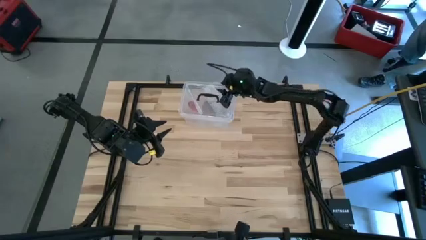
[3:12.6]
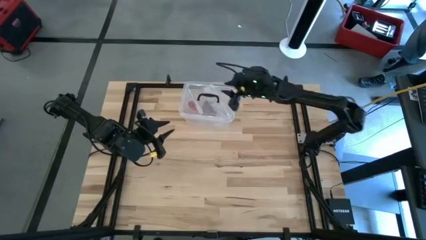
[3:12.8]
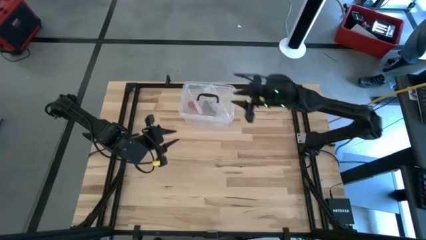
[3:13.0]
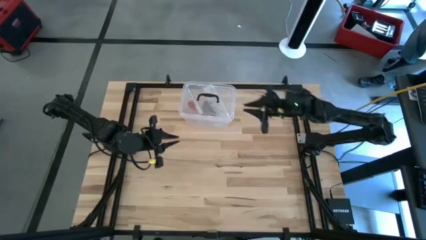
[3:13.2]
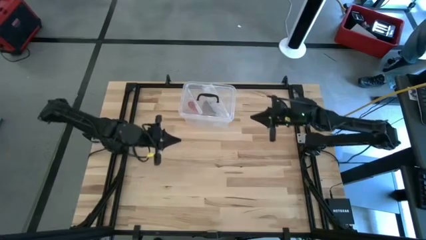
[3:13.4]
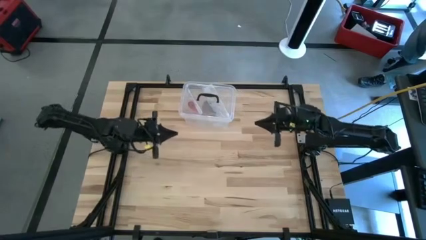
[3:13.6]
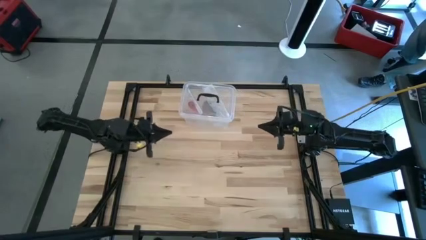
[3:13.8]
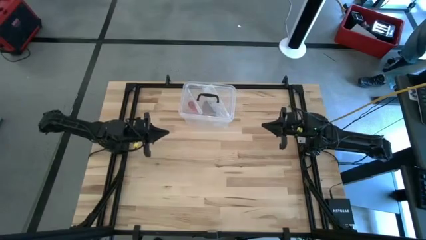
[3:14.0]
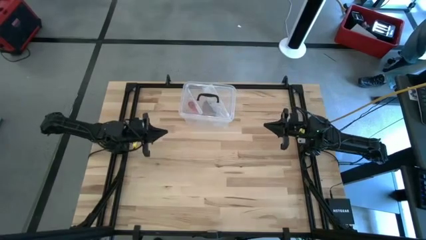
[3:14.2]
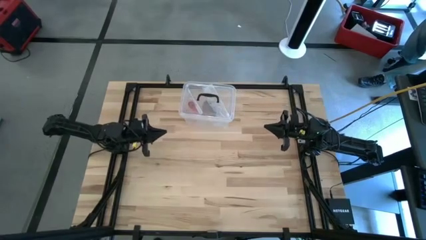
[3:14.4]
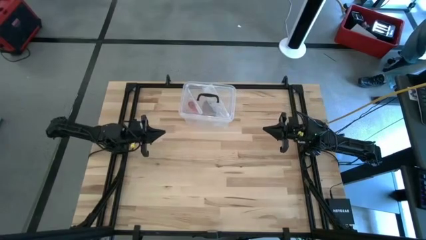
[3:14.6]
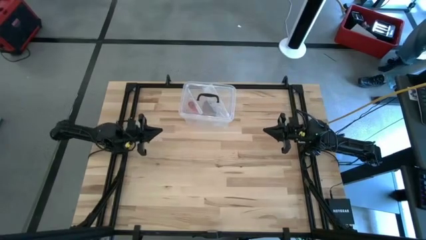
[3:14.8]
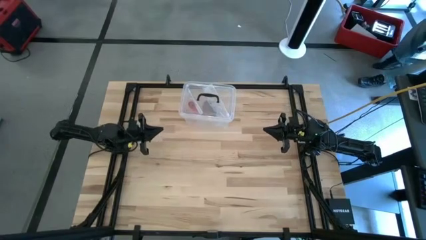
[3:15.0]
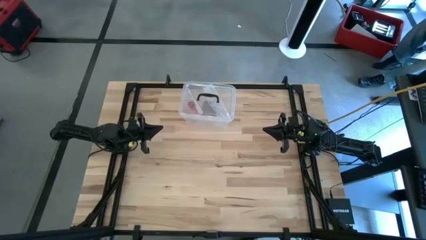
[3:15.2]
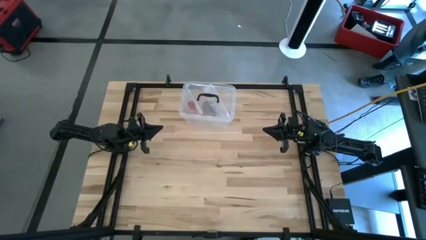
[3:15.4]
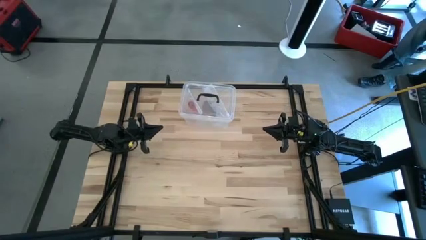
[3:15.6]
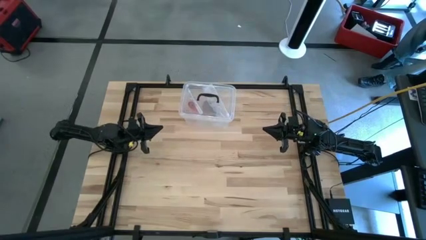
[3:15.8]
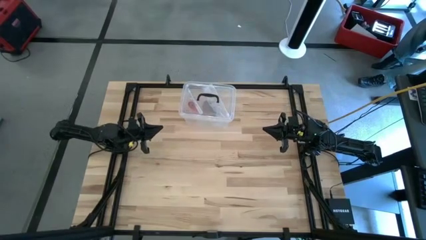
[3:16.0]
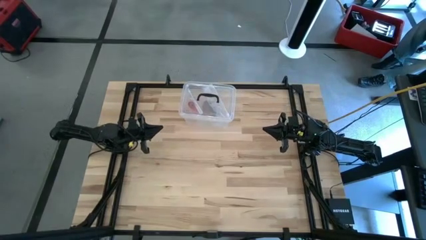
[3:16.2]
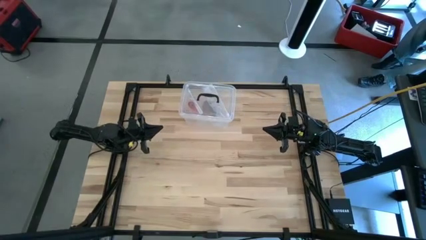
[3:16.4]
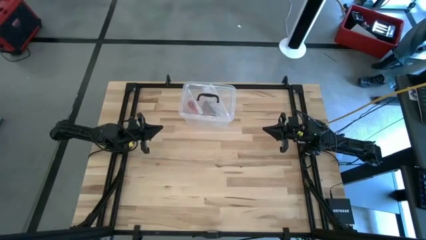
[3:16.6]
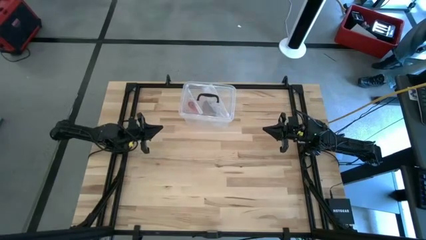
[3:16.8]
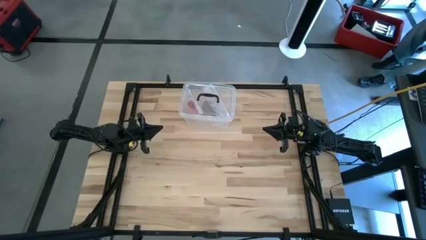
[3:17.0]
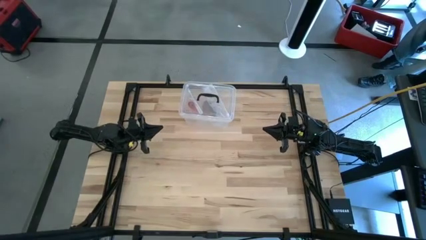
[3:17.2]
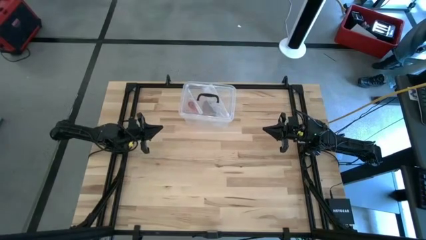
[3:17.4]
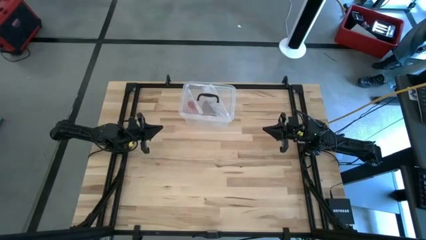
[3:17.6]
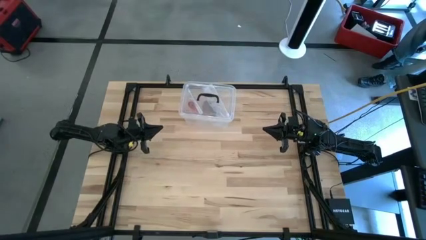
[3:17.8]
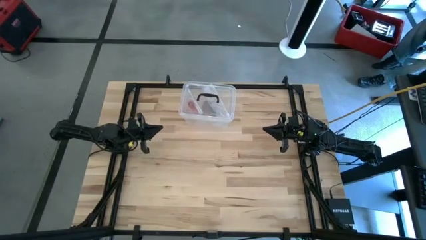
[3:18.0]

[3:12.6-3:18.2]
Task: Roll bandage
Return to Home Position

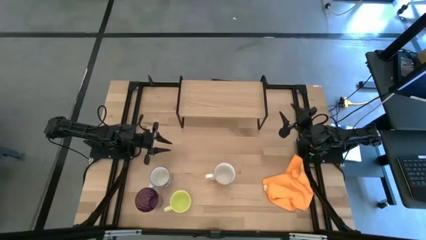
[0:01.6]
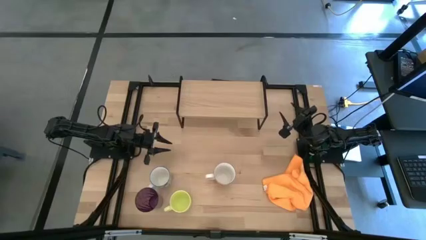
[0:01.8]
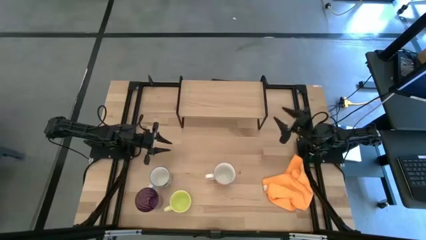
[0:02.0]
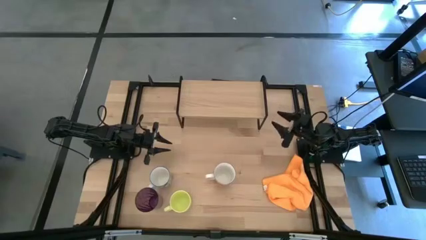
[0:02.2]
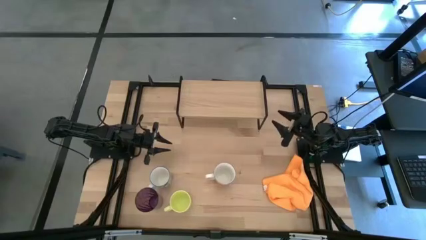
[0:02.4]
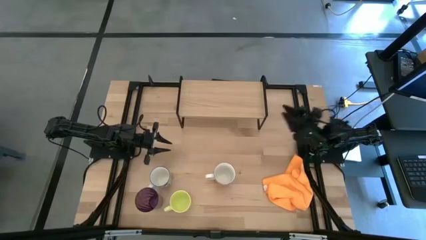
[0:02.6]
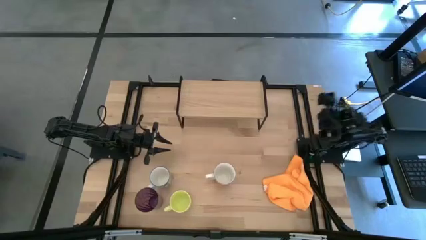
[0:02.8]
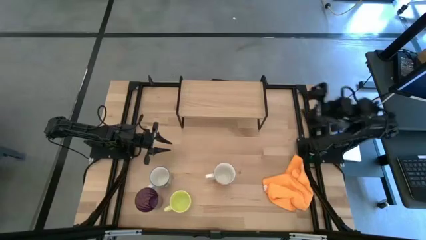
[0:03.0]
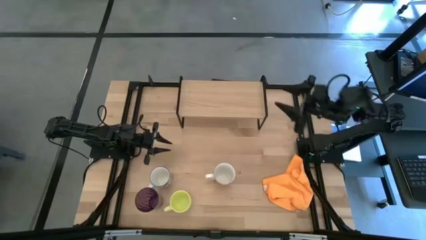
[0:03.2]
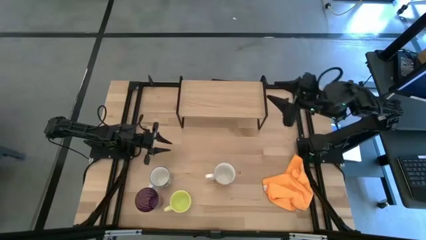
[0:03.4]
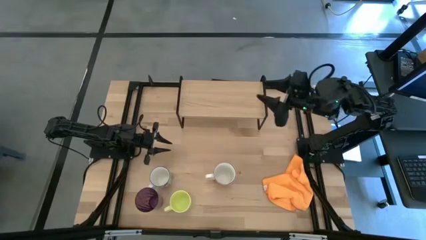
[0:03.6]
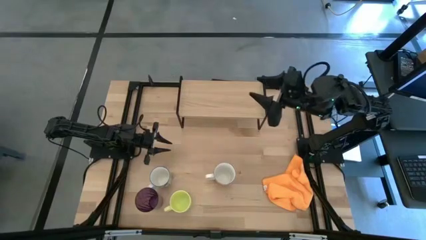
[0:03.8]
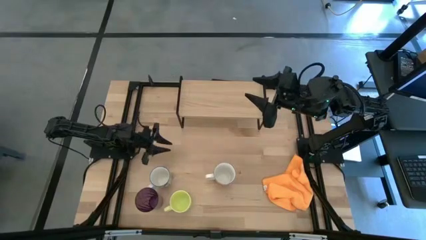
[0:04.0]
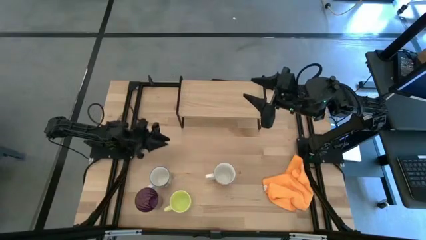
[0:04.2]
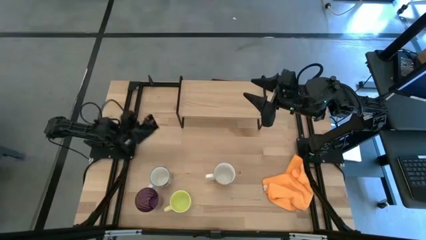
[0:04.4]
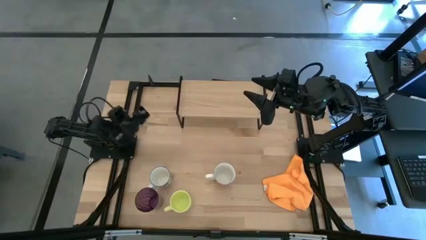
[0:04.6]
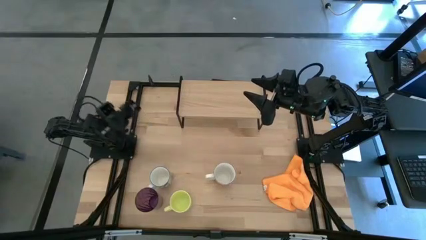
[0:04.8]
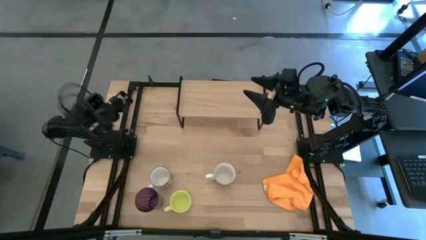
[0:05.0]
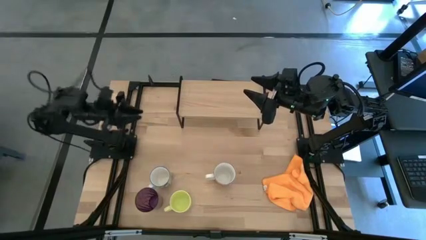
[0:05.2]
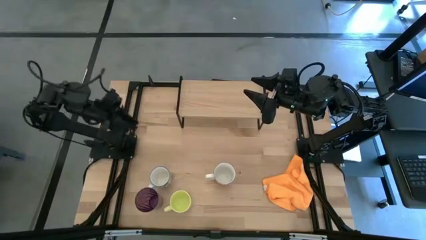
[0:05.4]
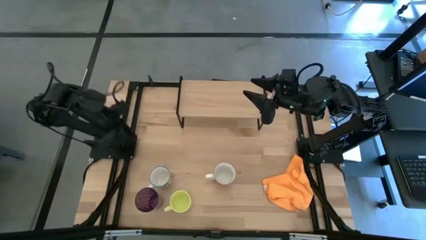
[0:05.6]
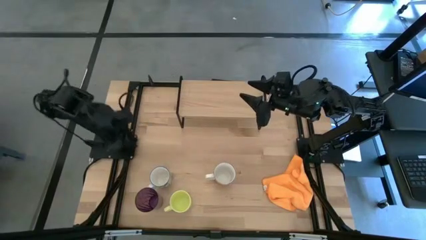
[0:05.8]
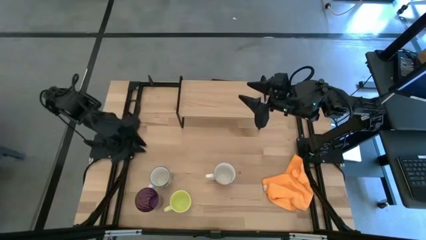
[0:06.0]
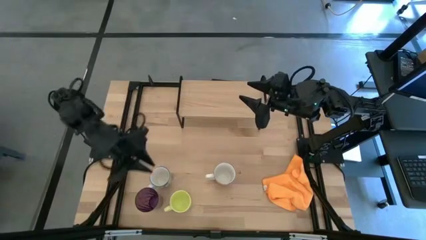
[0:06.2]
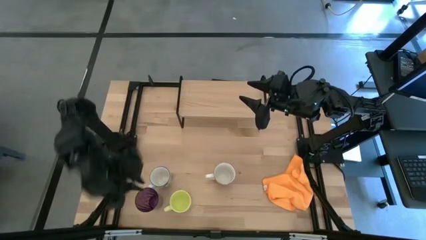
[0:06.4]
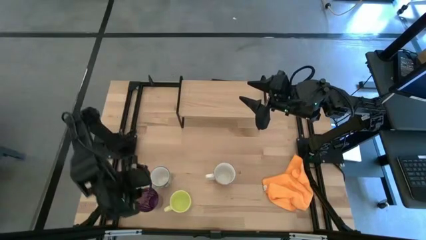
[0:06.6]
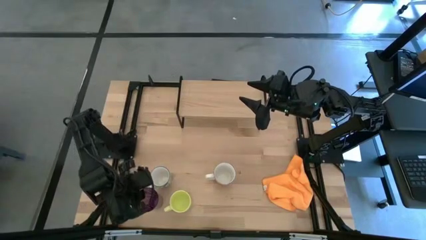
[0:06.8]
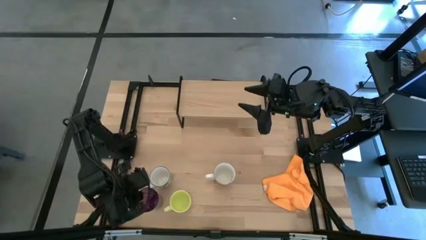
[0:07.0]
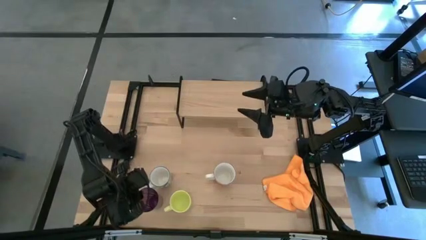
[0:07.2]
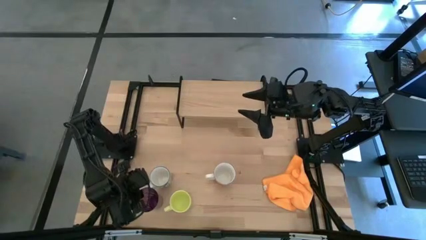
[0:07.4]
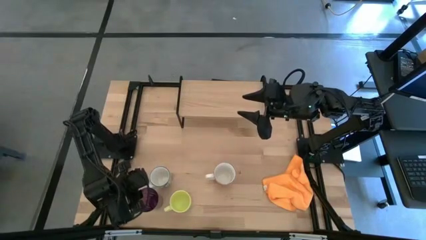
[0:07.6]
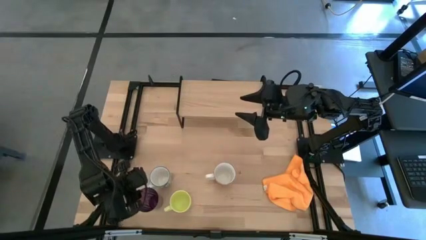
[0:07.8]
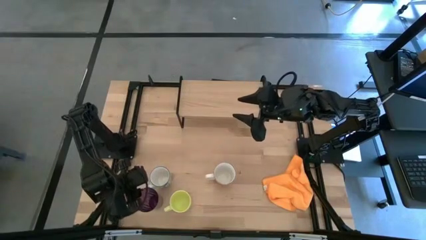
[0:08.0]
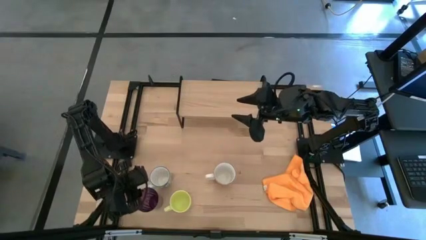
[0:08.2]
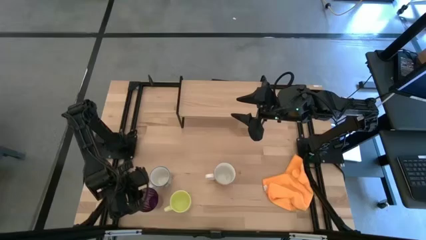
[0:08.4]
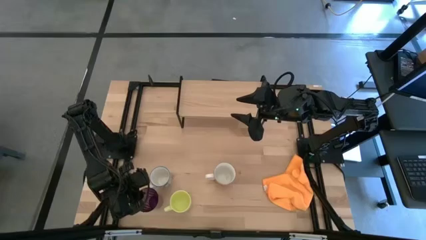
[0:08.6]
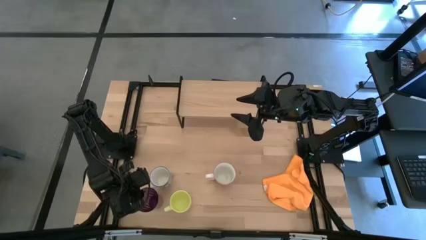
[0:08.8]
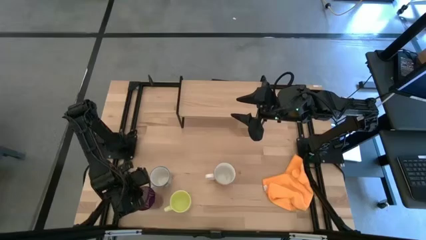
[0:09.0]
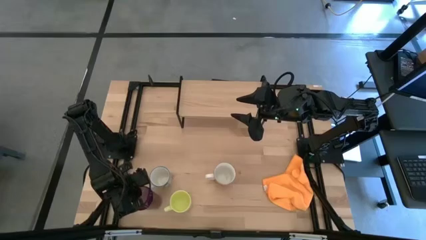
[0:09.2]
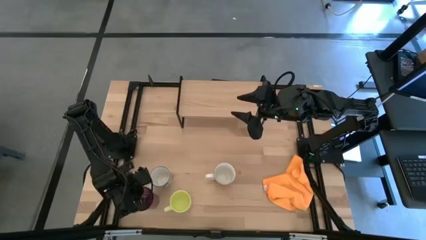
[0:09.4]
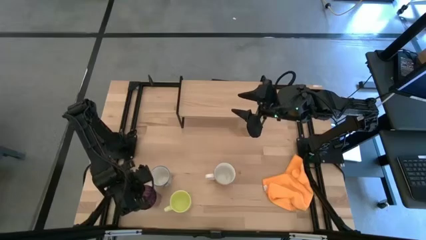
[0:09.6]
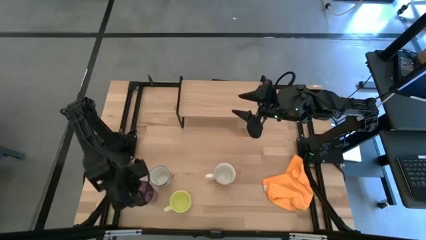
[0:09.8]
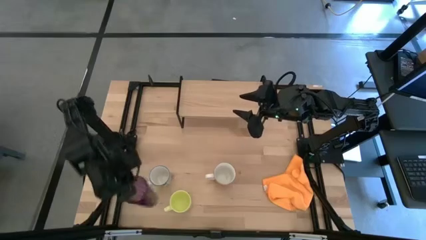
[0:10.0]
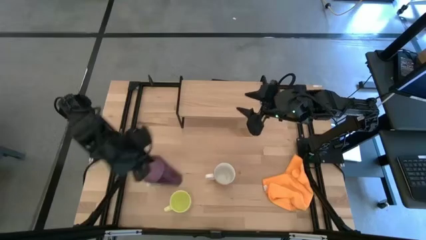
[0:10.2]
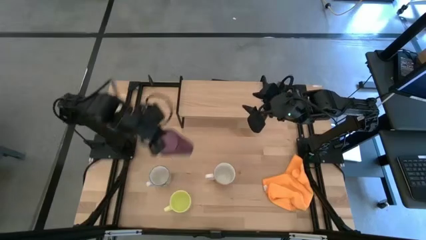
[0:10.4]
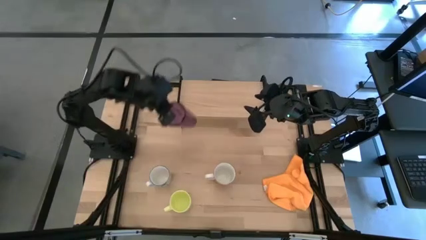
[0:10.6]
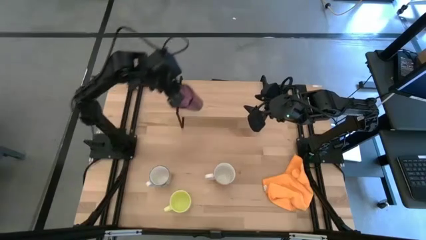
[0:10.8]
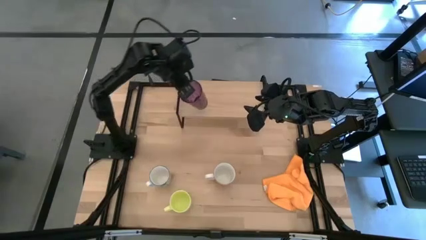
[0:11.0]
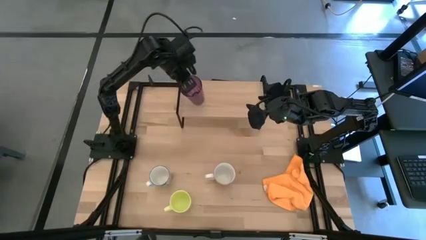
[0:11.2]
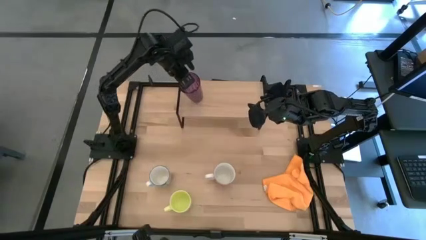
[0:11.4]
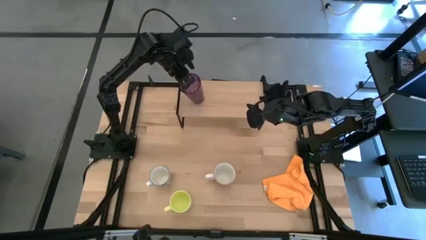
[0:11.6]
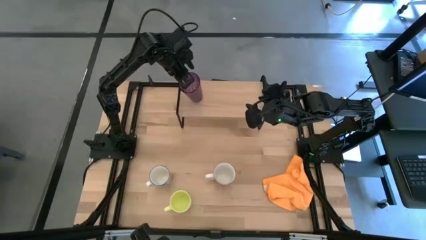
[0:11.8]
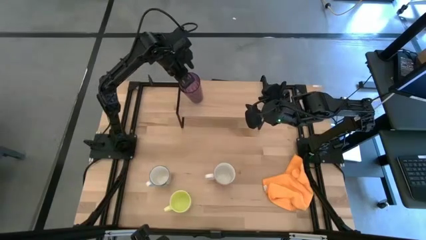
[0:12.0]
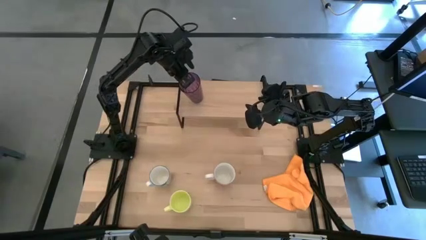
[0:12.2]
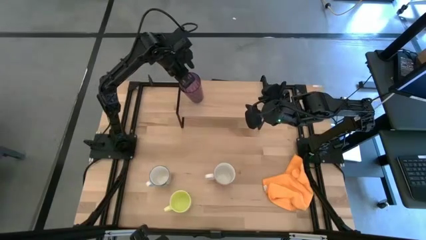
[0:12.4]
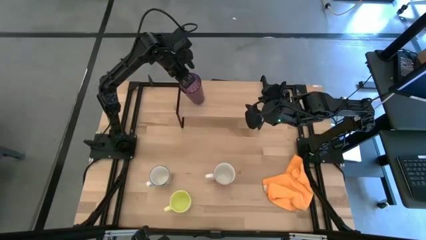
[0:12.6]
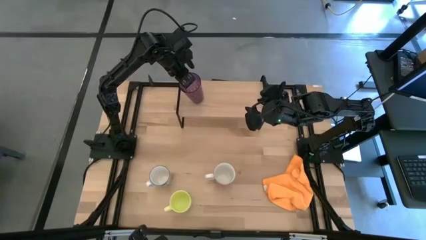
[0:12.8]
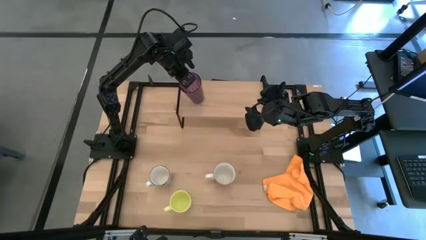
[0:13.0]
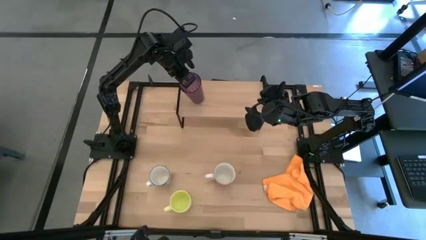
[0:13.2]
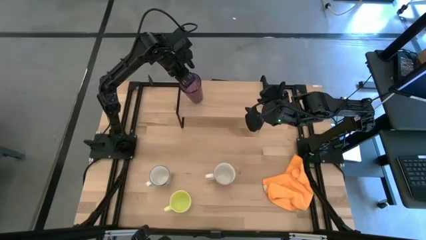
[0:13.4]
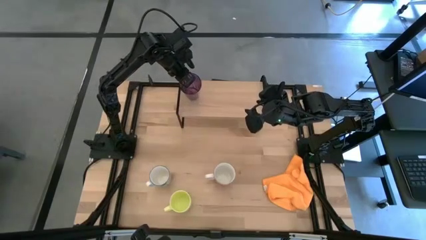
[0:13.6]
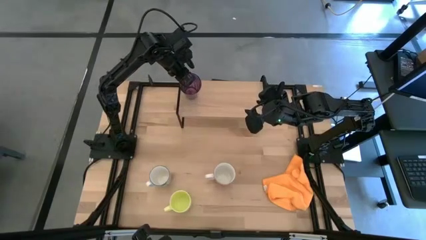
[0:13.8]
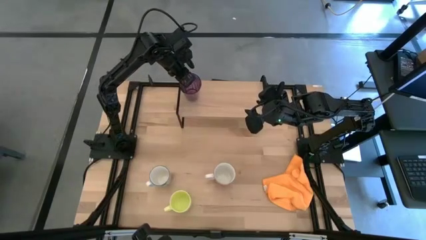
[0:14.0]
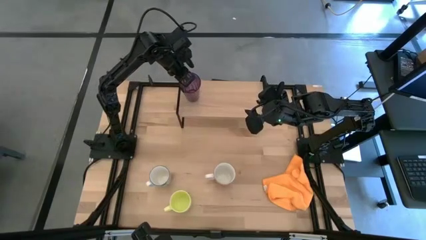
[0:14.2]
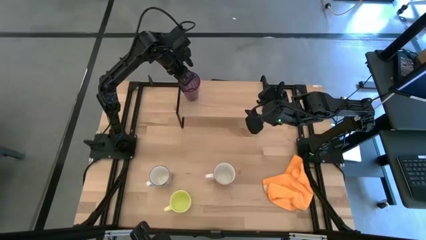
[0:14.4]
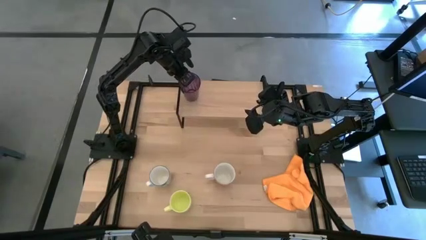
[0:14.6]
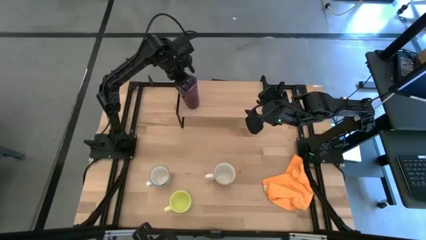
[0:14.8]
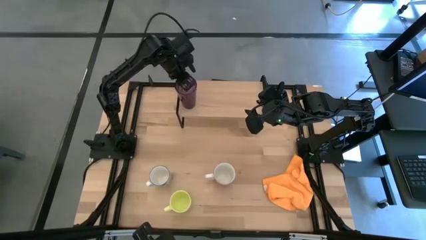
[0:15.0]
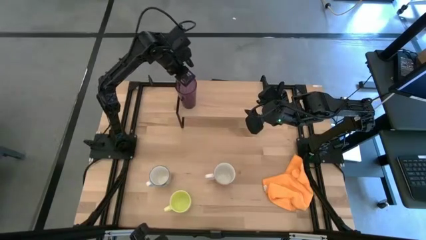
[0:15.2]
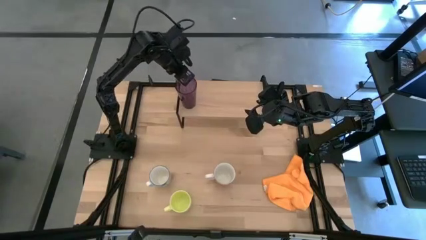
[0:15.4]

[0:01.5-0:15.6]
Task: Stack small to large cups/mugs on shelf
Put the violet cup on the shelf
